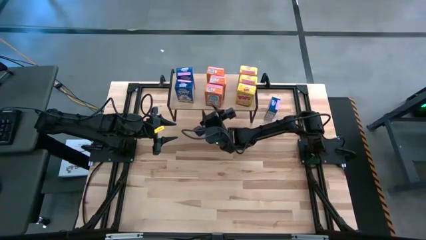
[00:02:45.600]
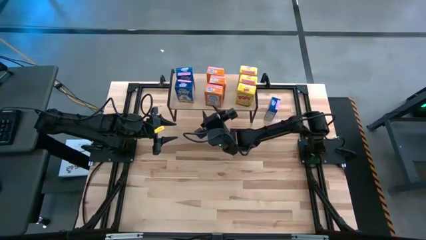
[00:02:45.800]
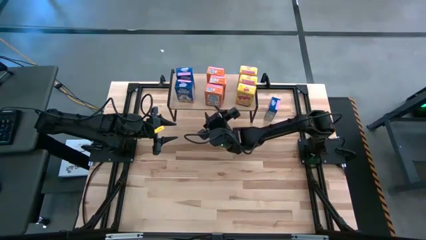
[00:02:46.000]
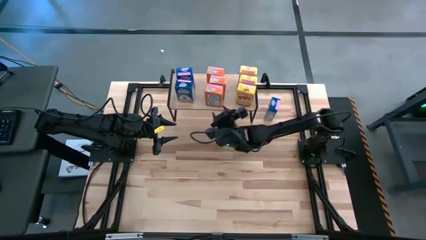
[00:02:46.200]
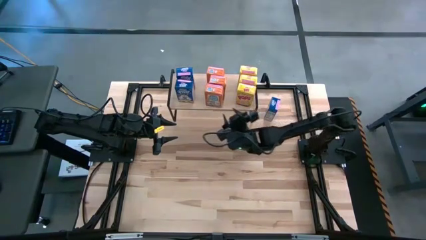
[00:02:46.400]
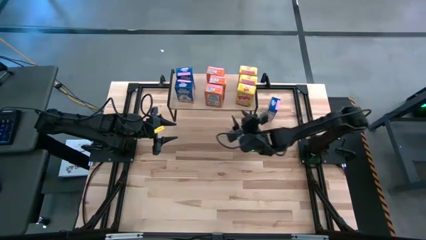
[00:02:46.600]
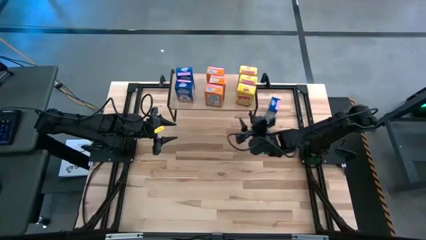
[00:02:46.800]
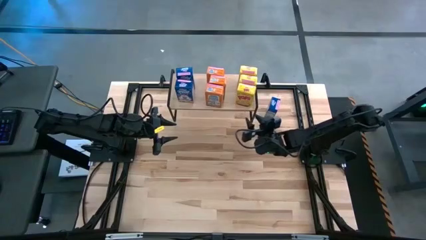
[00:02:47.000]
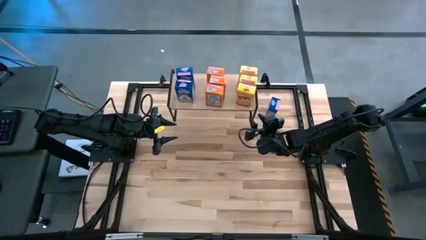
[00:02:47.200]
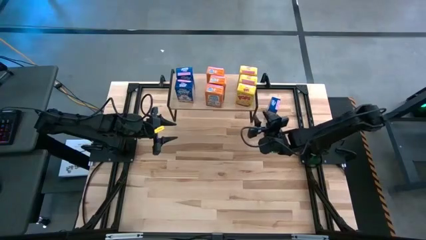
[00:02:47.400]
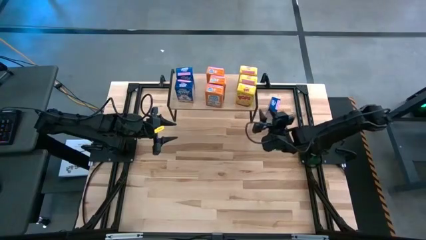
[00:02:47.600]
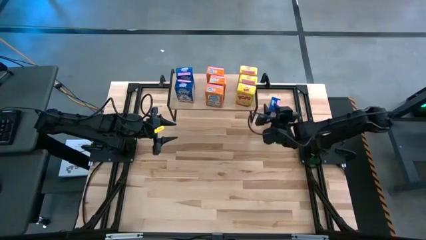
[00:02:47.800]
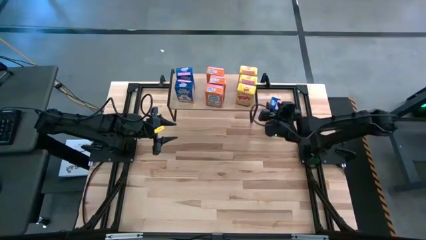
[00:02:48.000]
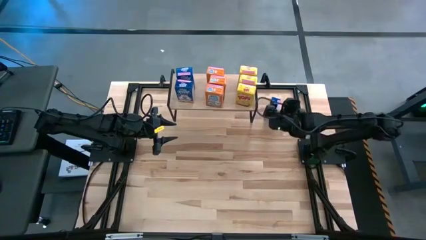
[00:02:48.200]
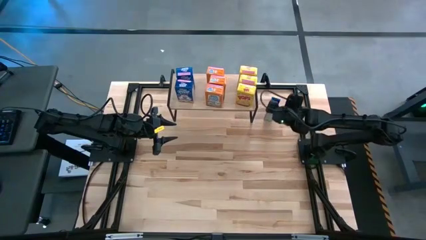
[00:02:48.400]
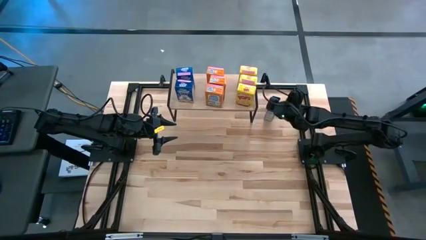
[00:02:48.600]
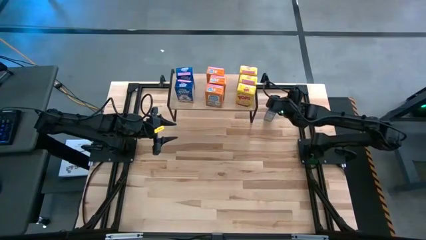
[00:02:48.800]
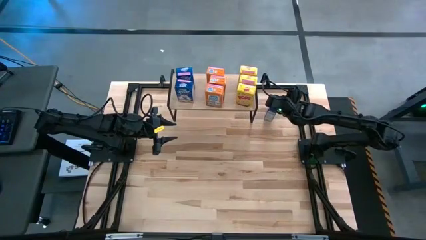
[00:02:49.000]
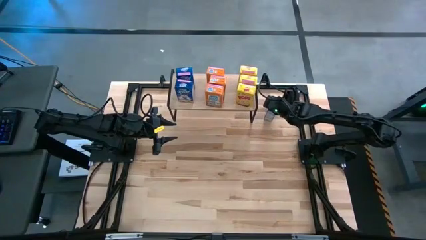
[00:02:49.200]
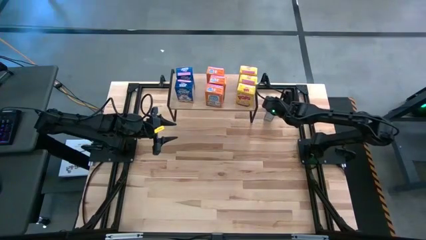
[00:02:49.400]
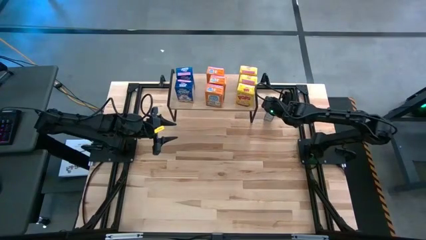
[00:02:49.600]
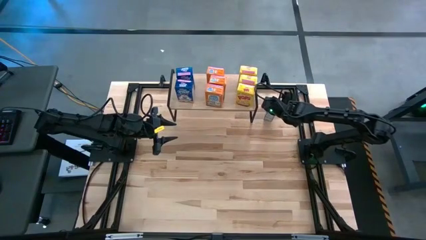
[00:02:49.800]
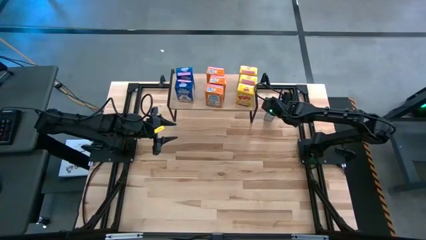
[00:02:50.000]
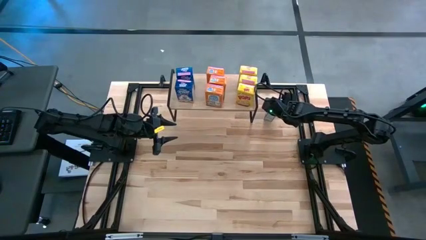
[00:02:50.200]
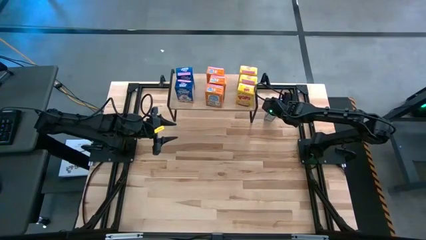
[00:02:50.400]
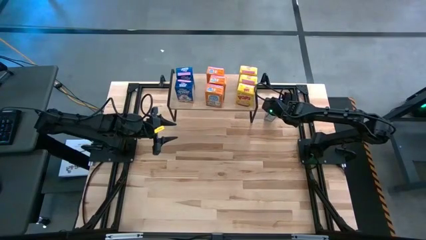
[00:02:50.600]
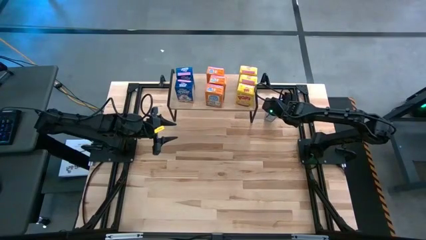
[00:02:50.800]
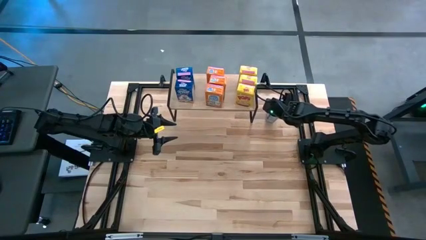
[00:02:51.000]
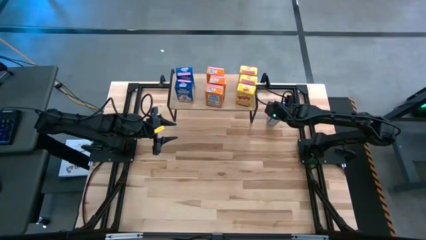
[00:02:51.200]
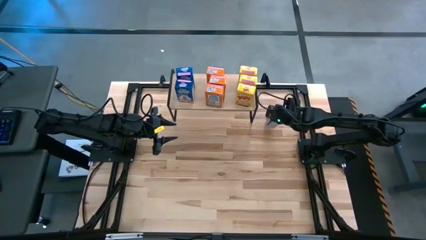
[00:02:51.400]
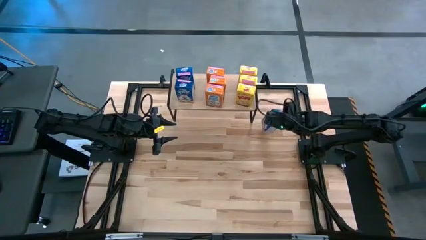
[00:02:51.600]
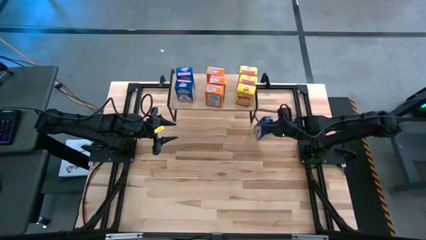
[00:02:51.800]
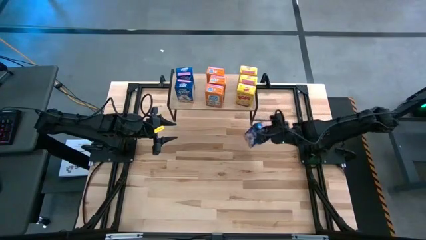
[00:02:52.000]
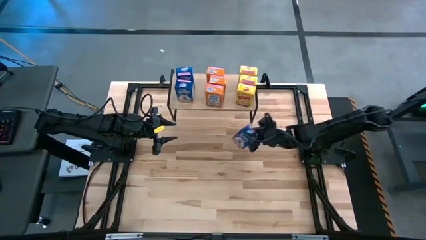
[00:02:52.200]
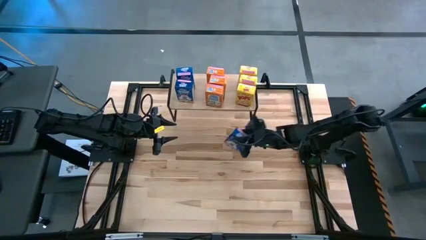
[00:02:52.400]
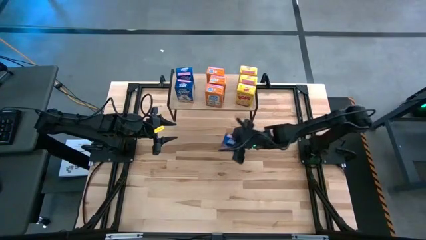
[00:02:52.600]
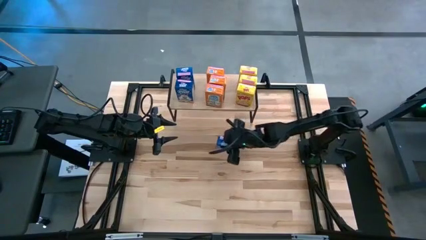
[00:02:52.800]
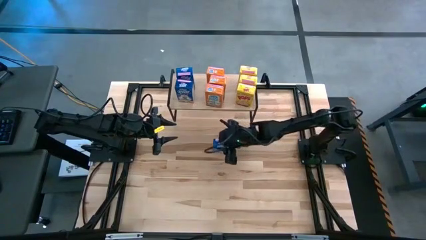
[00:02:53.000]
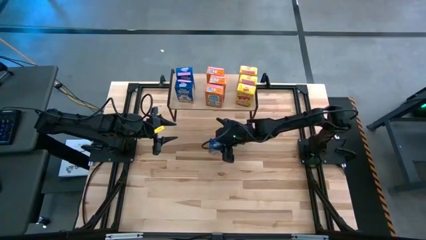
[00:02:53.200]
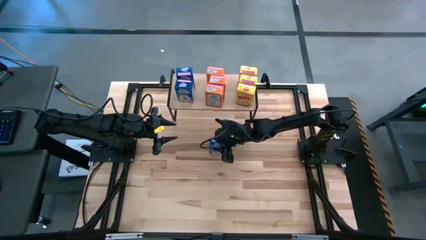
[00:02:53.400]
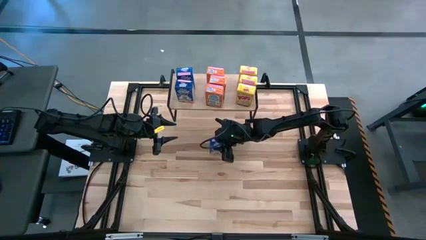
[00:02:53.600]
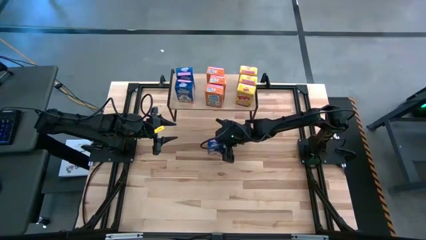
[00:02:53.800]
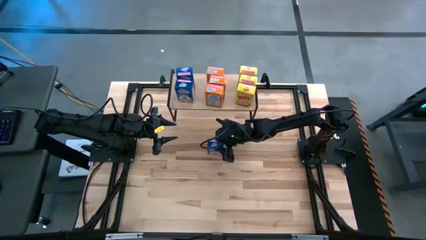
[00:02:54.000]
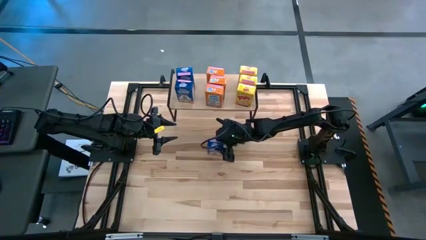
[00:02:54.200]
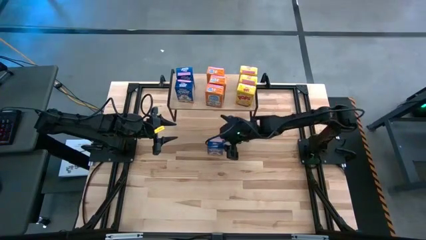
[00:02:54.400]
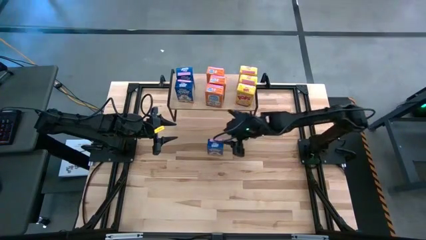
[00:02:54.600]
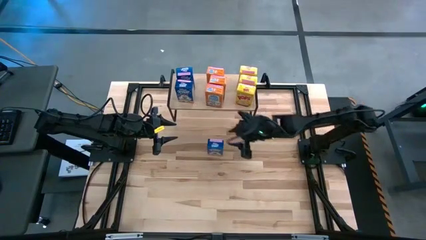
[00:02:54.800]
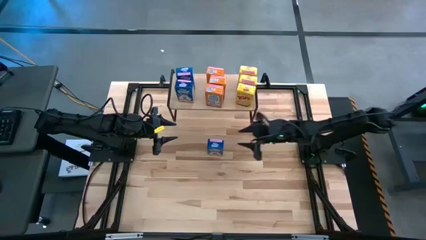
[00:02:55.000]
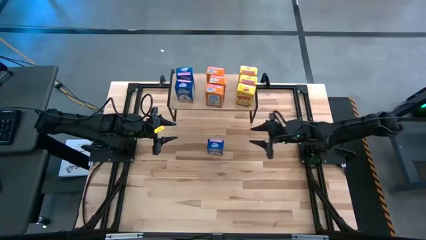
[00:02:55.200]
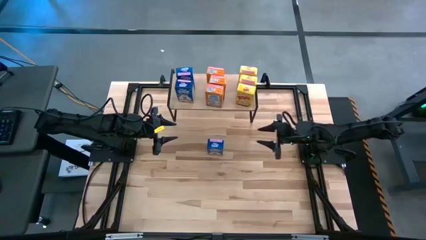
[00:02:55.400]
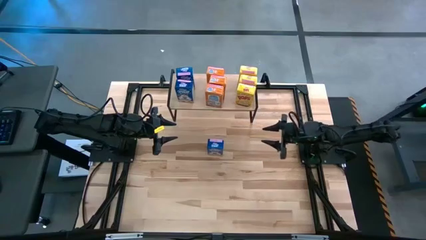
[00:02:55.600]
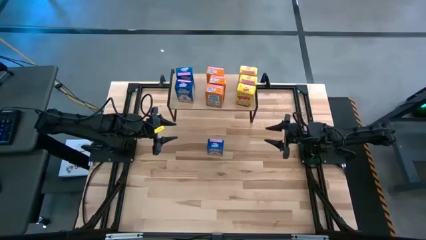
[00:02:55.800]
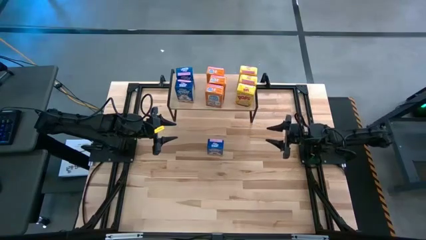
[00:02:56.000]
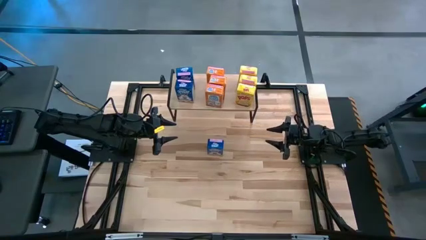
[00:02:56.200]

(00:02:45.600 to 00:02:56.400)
Task: Stack cereal on shelf
Put the blue cereal box aligned with the other blue cereal boxes on the shelf

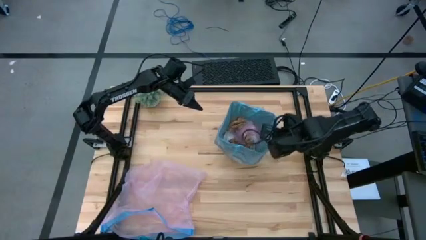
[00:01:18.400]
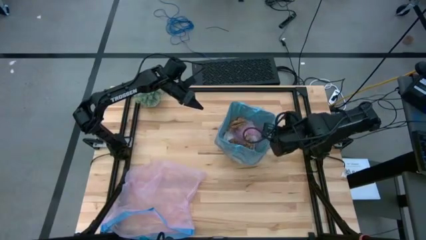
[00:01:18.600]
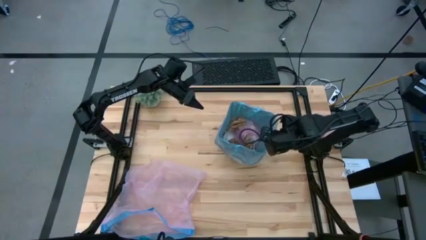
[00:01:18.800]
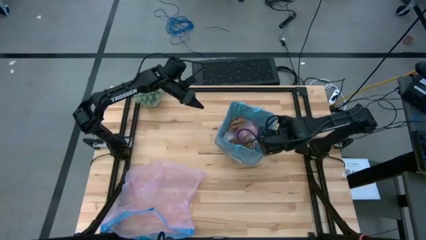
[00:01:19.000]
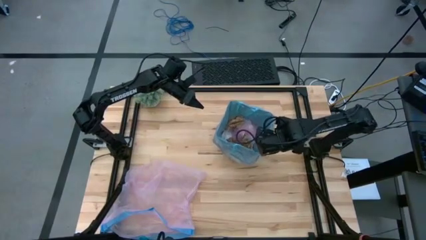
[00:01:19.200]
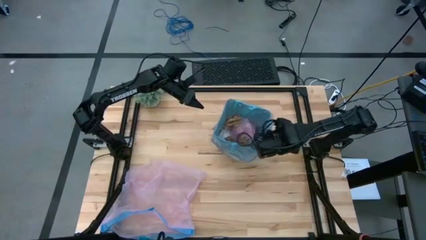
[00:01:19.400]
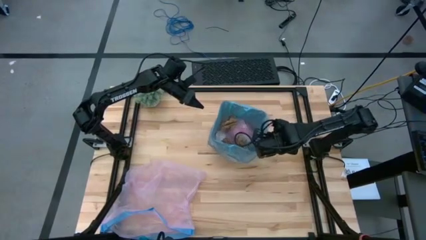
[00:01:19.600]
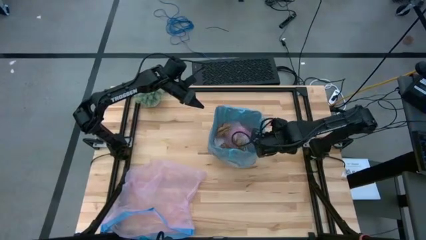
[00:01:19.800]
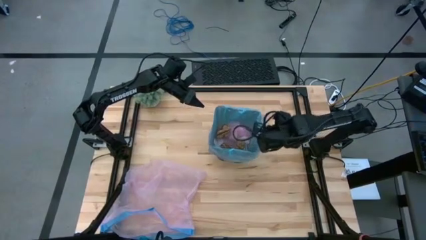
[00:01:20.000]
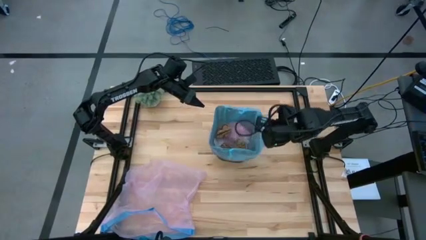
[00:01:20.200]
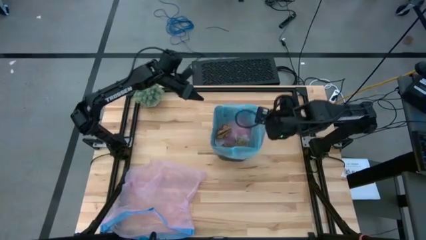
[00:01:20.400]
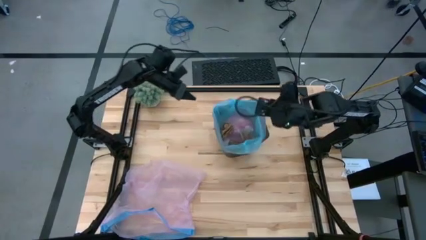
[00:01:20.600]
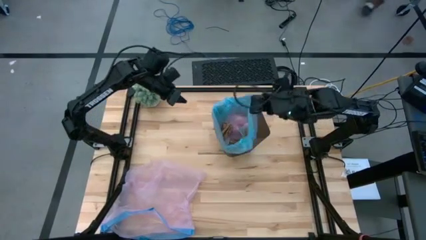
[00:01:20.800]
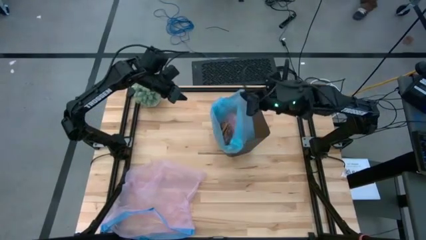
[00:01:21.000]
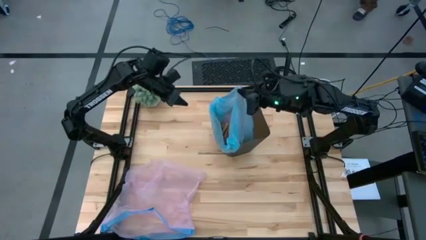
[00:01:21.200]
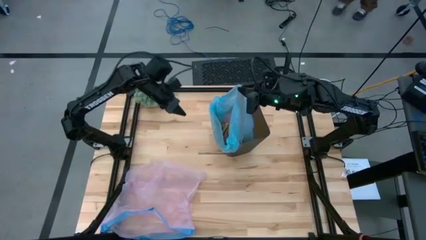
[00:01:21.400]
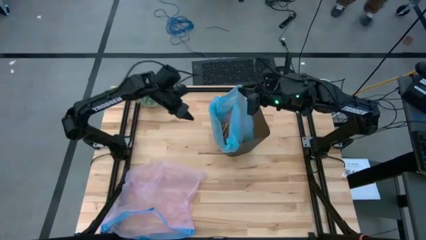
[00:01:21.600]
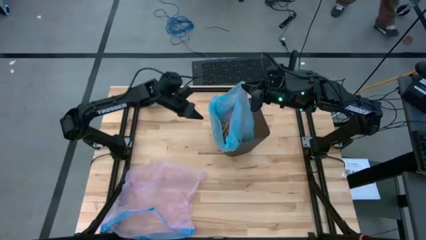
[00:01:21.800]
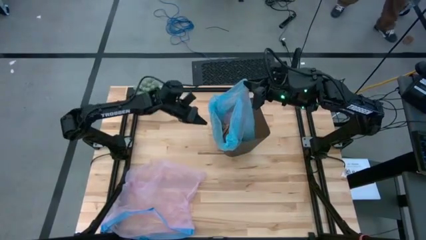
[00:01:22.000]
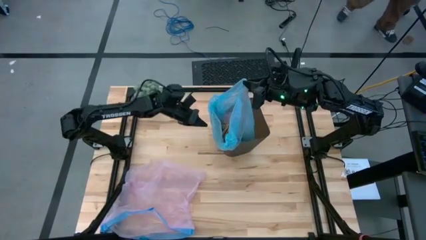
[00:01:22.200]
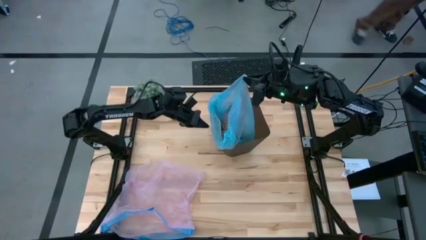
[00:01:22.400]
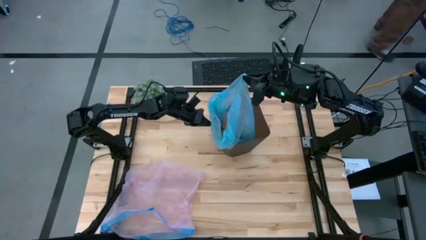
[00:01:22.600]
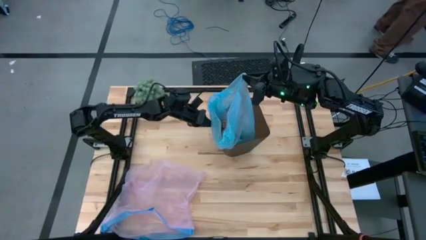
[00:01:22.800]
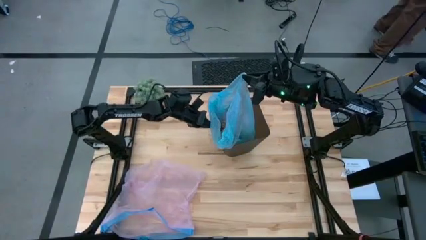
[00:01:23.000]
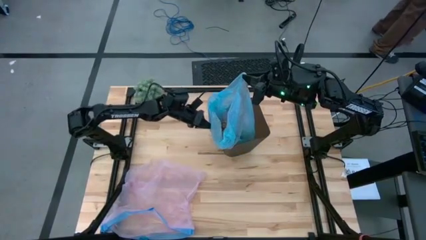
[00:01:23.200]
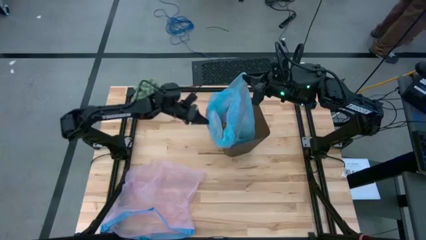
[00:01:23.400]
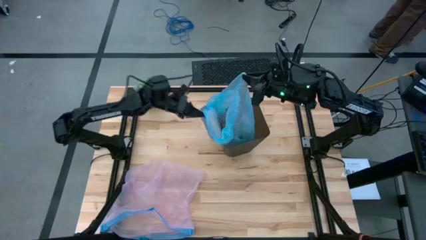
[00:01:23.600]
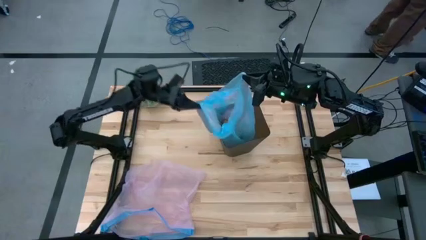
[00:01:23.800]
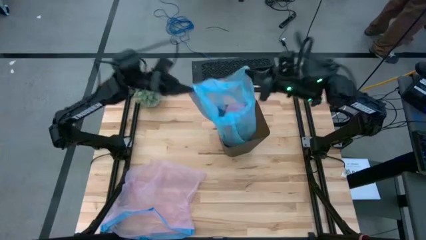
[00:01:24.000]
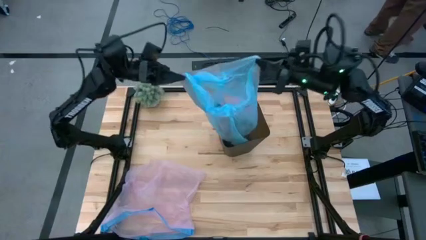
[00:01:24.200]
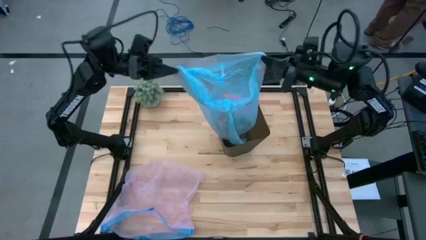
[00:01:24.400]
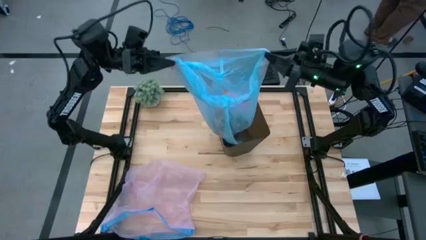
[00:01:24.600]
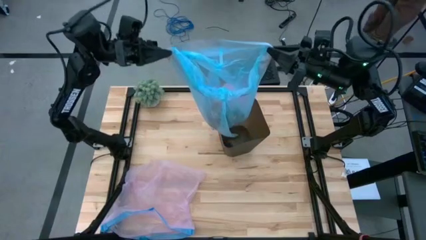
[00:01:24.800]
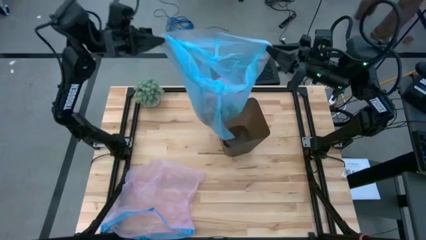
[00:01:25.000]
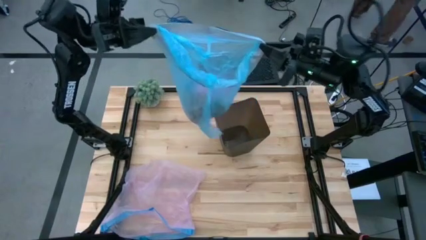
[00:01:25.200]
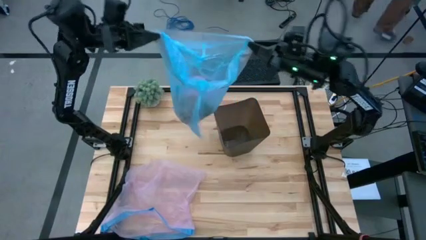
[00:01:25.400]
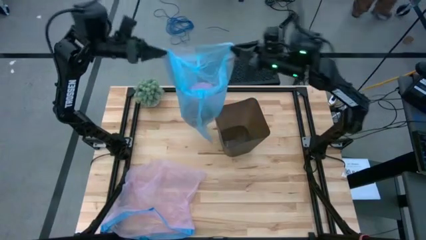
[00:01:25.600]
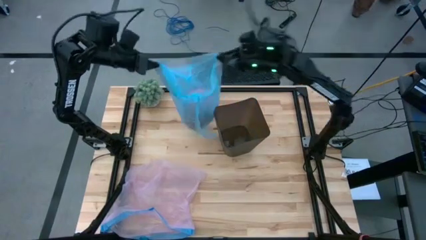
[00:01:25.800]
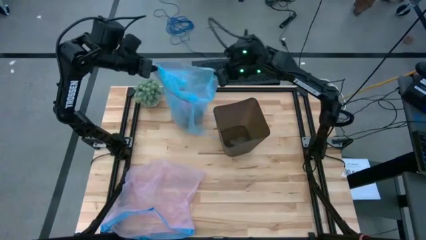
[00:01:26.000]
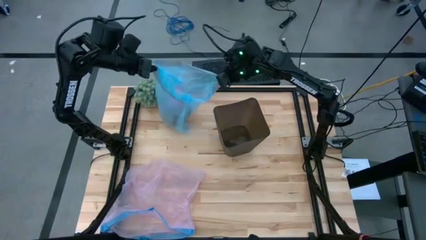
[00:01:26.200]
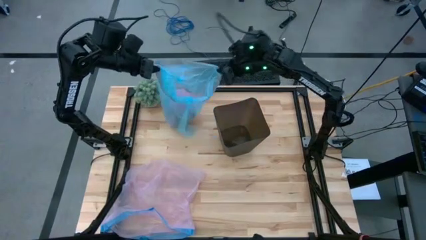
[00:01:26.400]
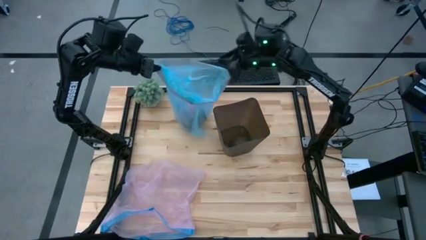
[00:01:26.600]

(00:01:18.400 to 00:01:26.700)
Task: place trash/remove bag and relplace
Remove the blue trash bag from the trash bin
